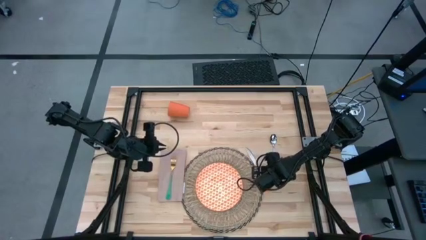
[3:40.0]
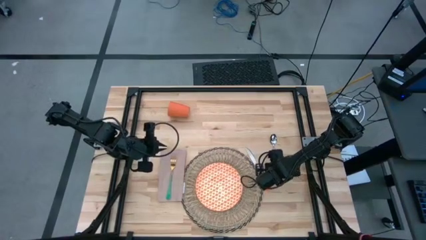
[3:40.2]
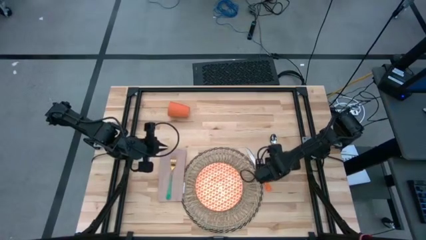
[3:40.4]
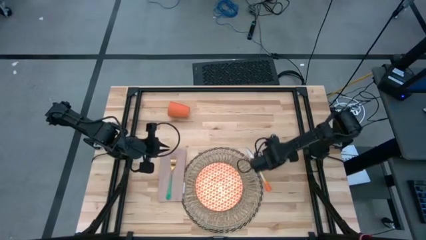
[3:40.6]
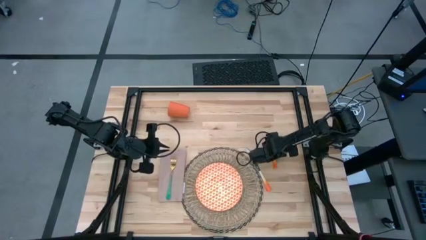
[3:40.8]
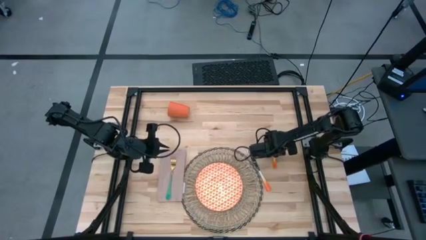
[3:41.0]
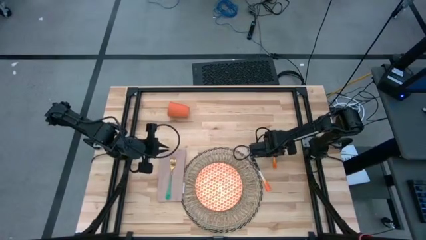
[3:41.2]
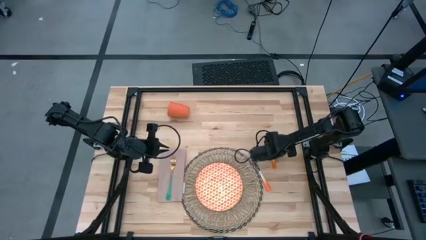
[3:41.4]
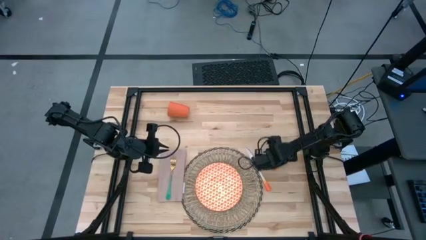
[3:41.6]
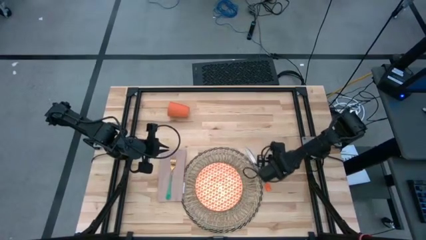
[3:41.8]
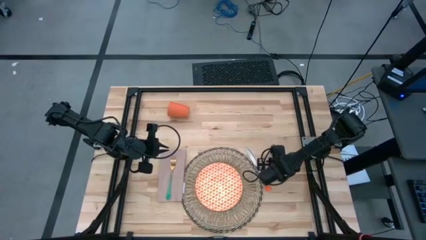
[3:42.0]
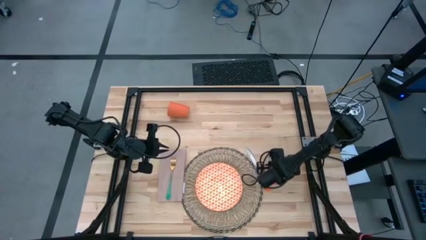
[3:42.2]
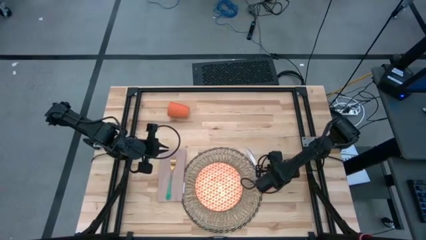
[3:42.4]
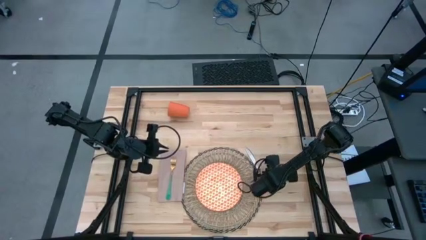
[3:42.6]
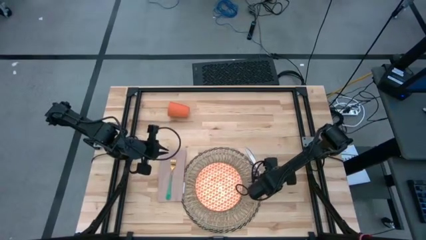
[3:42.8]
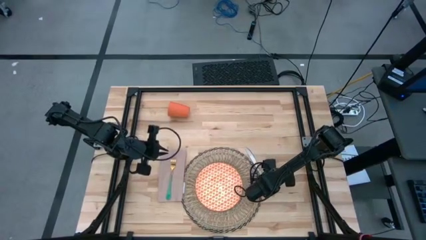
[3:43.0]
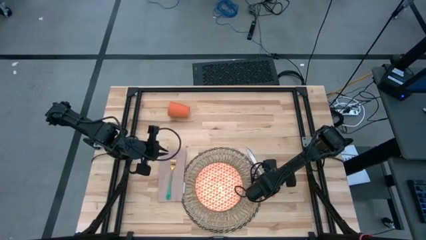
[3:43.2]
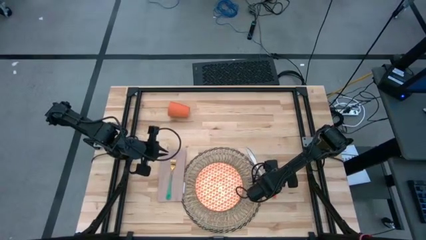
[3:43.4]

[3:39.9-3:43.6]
Task: Set table place
Put the spoon on the table to the right of the knife

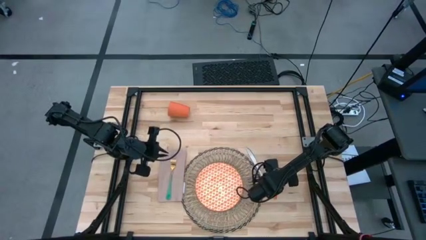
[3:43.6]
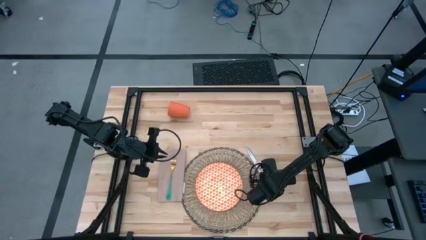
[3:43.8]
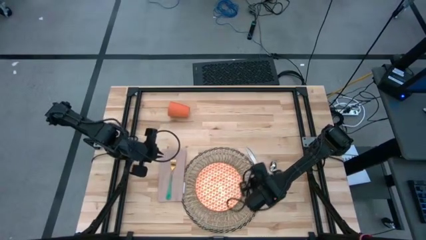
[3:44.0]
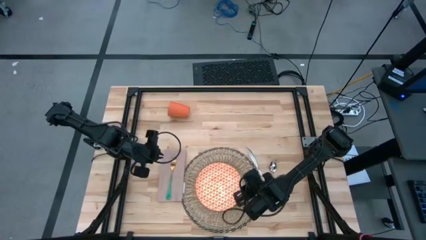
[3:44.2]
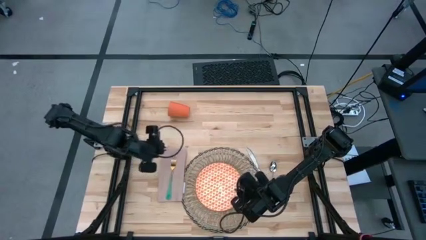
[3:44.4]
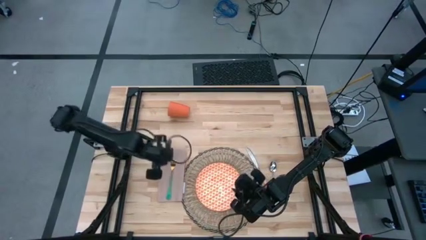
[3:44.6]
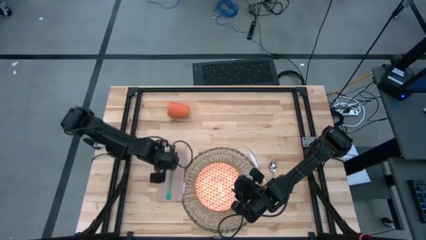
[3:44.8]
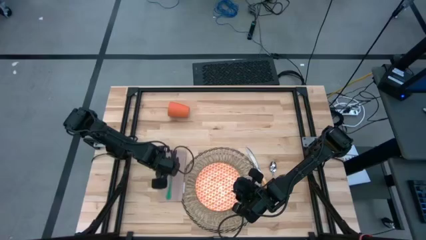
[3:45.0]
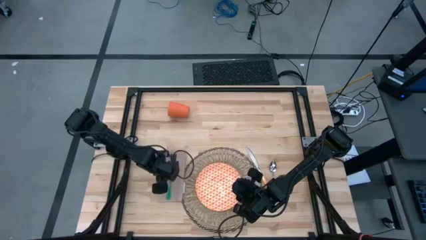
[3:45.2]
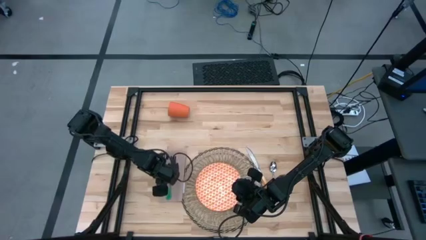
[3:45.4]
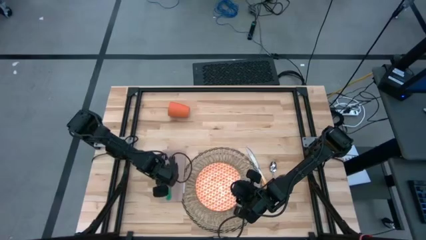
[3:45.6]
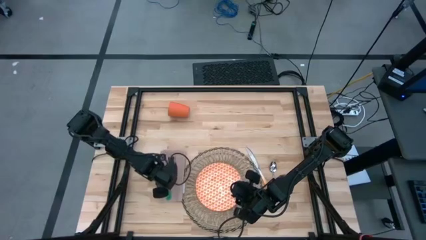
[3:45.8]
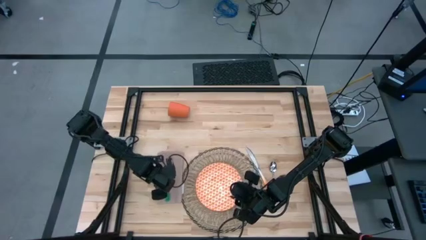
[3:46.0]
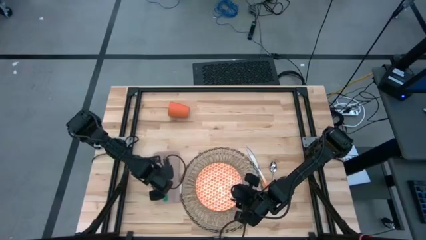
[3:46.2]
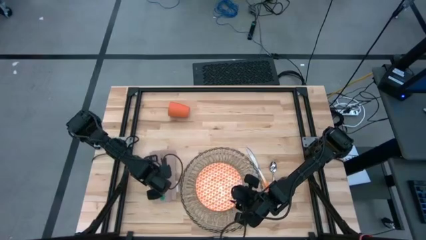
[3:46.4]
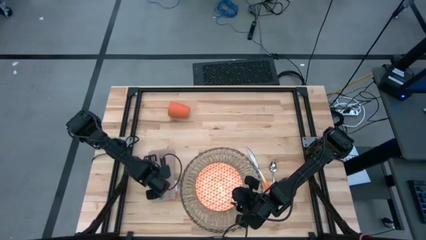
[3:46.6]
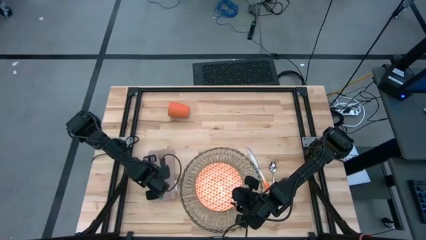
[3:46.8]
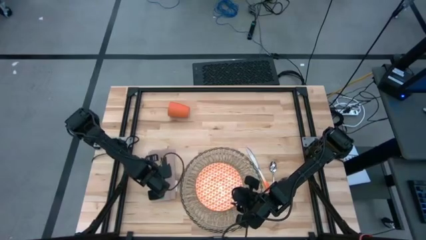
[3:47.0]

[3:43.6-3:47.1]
Adjust the napkin

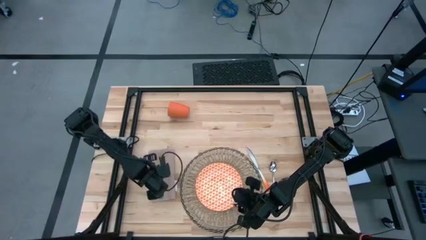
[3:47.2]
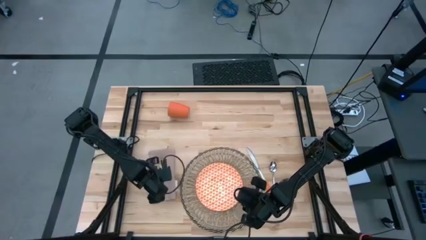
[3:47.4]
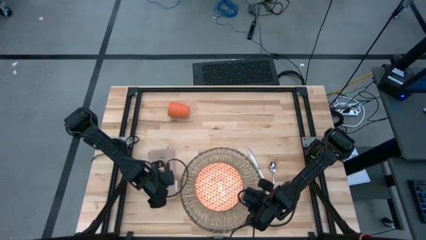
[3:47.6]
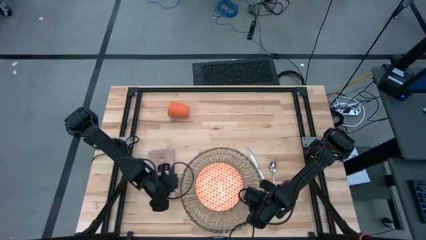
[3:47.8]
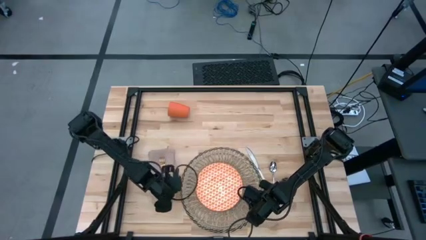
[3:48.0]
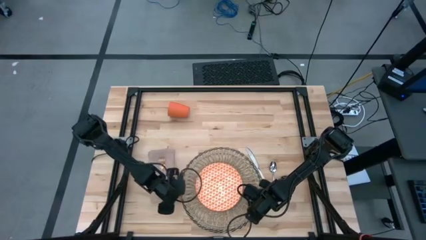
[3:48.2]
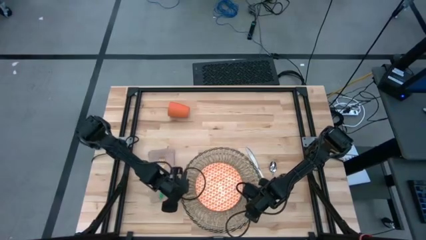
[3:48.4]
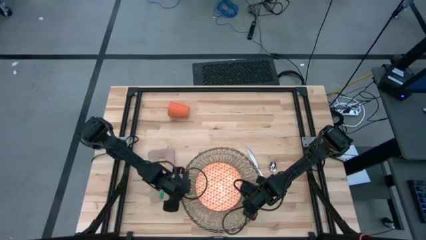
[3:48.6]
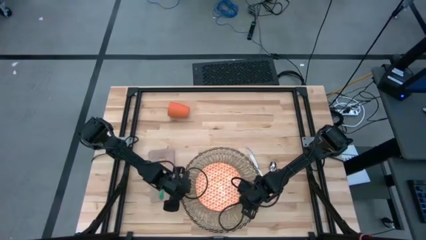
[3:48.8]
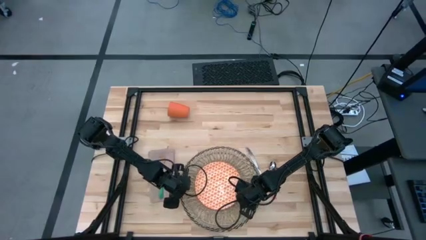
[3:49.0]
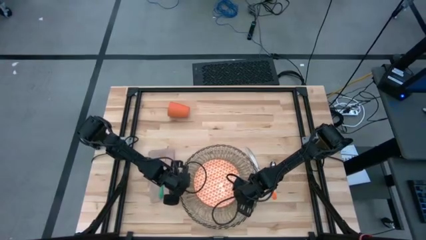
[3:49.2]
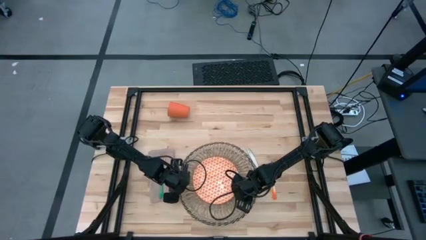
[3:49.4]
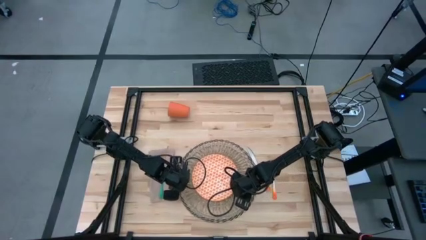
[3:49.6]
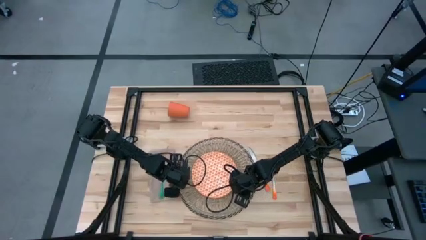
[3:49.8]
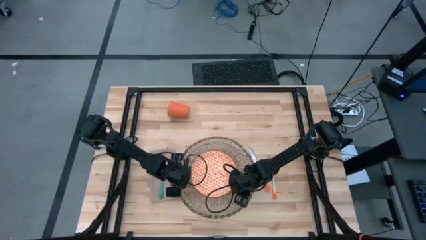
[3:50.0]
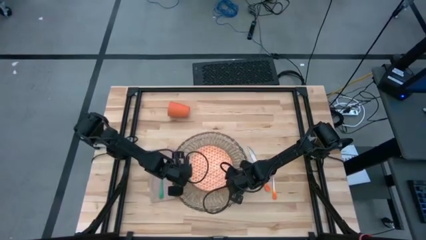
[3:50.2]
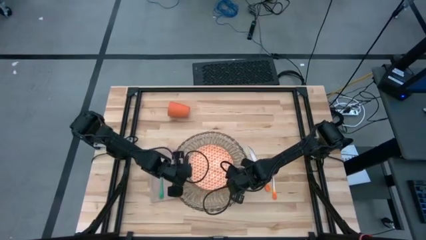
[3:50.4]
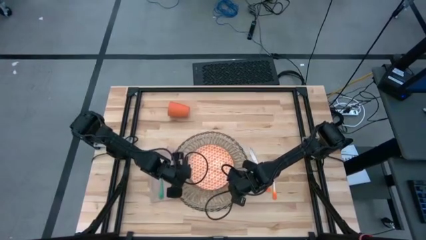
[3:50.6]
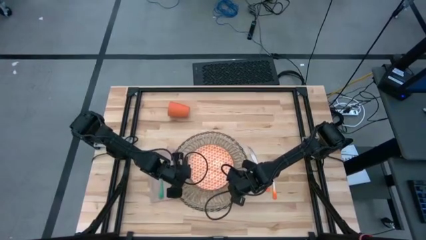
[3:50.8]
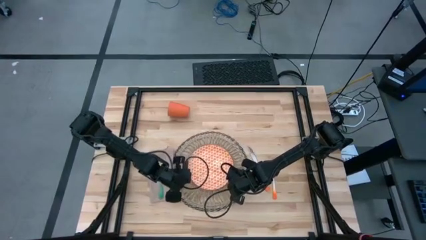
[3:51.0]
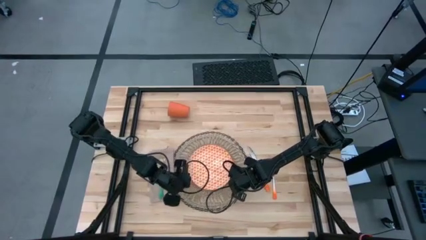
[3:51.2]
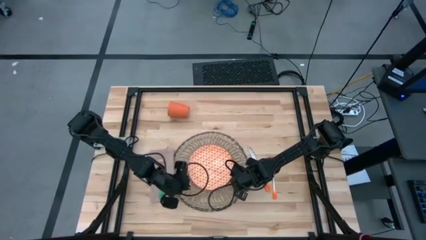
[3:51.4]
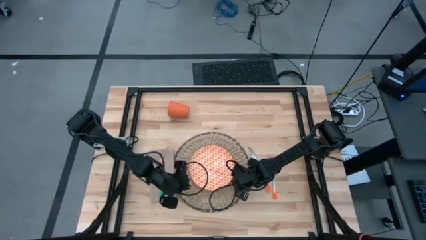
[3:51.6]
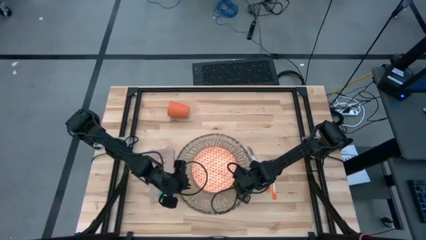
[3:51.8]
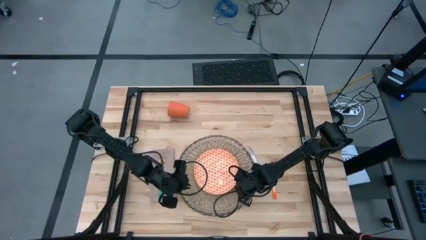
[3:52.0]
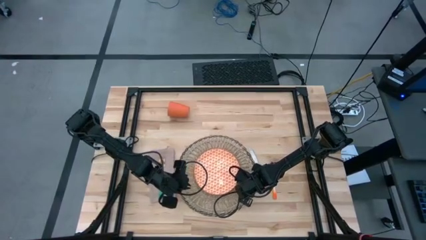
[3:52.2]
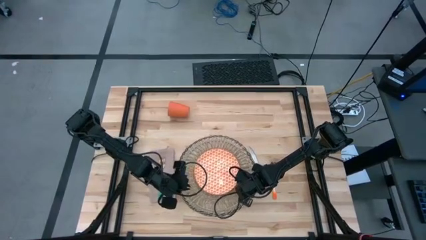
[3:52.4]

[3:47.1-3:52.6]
Adjust the mat

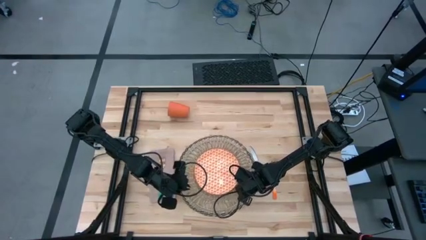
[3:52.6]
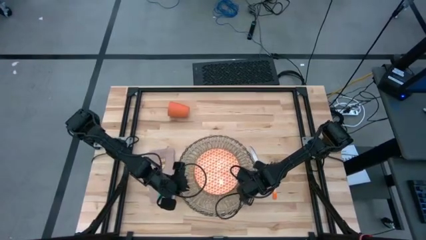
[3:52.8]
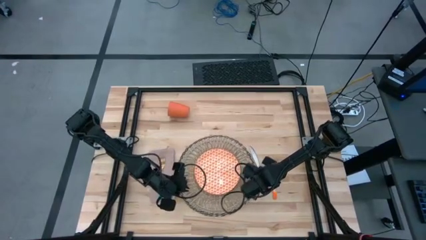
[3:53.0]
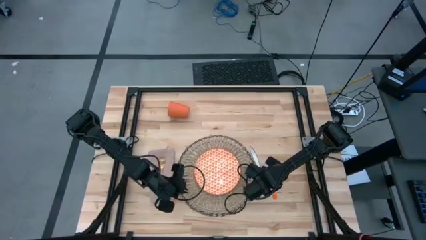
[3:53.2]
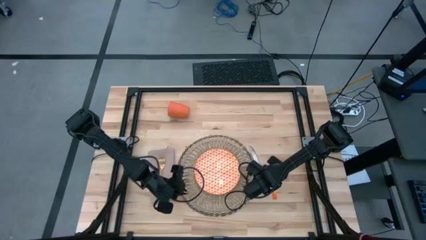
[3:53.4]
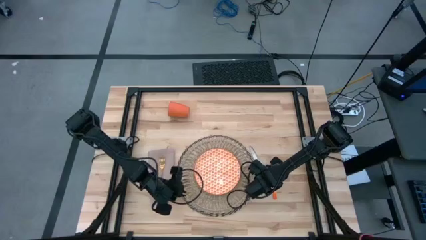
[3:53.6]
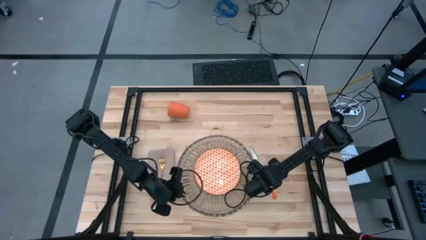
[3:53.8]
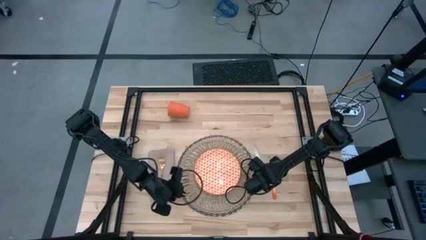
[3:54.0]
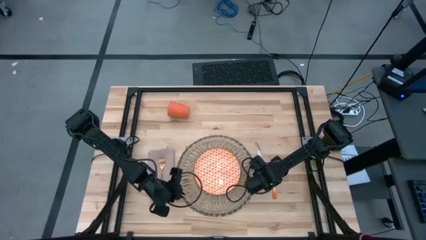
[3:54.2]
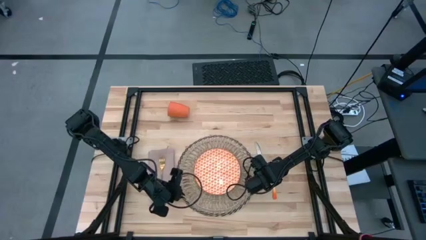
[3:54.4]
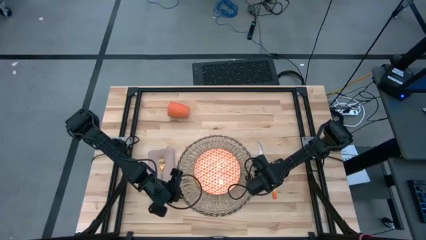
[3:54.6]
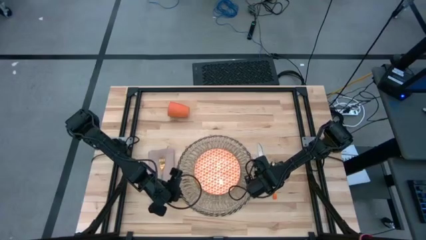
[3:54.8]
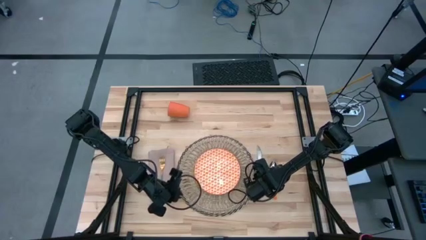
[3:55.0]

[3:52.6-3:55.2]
Adjust the knife

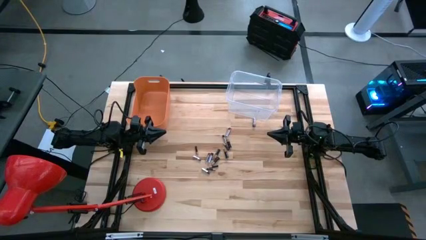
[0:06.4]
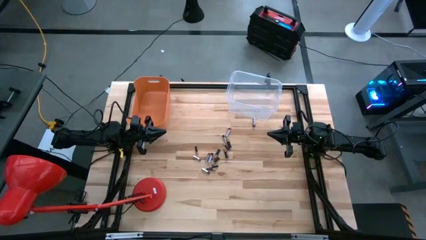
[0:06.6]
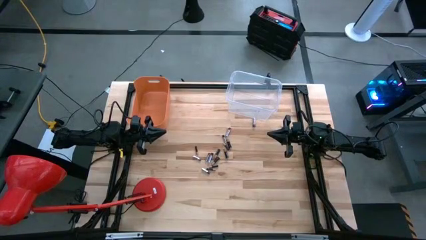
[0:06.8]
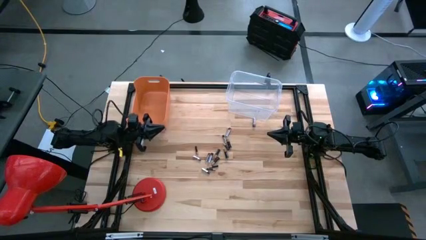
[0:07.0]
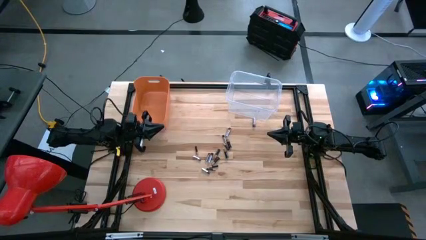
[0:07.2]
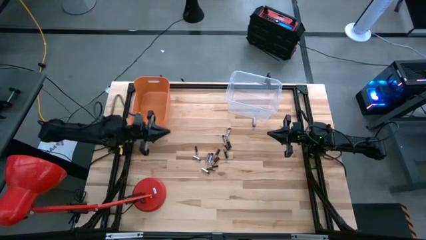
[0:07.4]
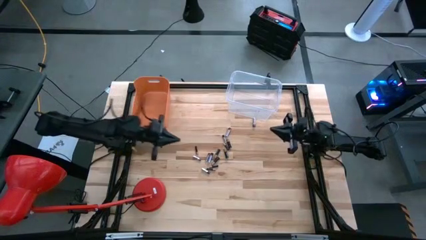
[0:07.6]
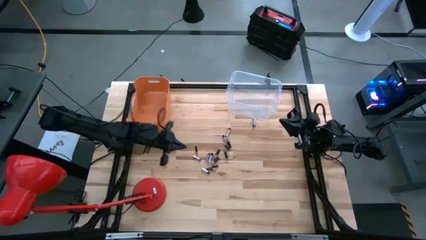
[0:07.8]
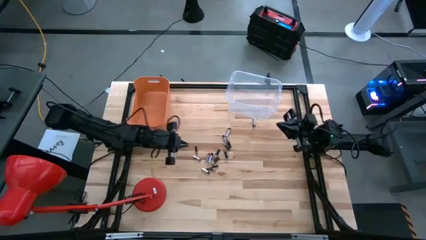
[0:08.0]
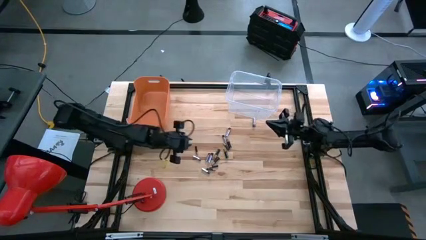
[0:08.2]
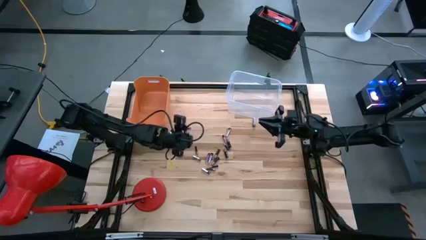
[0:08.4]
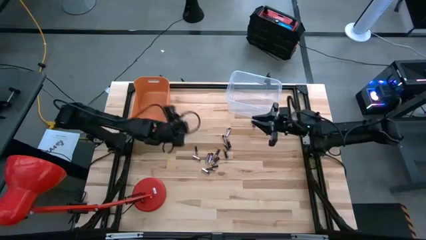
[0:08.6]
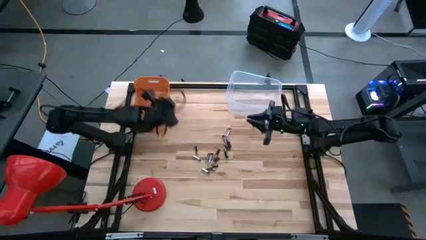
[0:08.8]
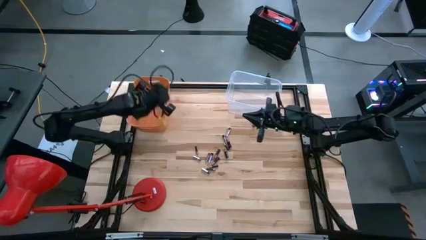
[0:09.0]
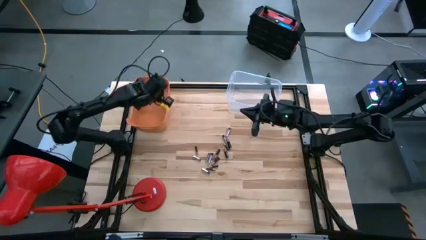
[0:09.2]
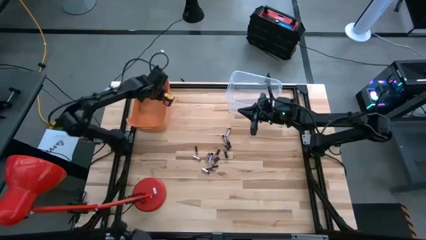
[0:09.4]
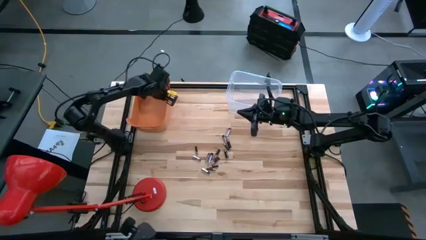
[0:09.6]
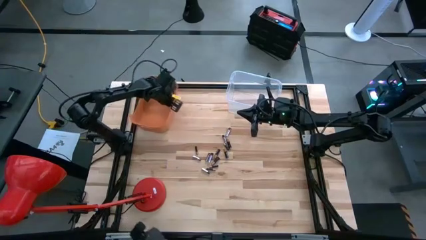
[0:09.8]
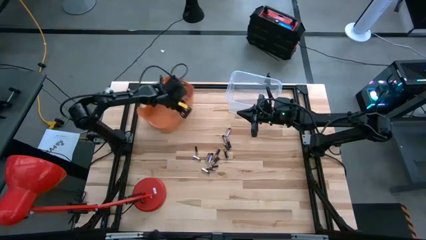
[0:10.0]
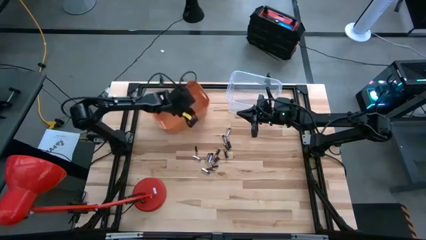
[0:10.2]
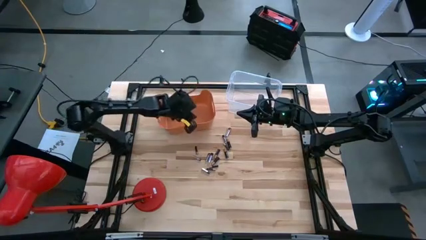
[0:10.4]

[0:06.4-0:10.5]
Task: Sort batteries
Adjust the orange bin
